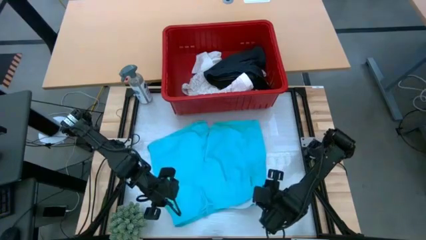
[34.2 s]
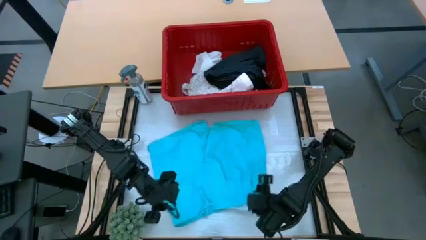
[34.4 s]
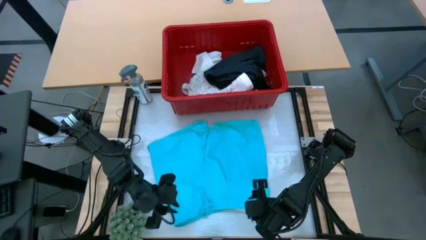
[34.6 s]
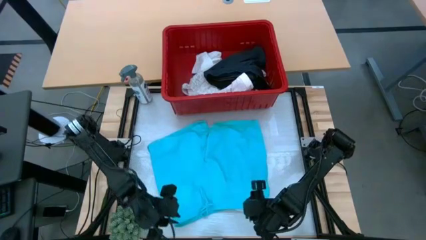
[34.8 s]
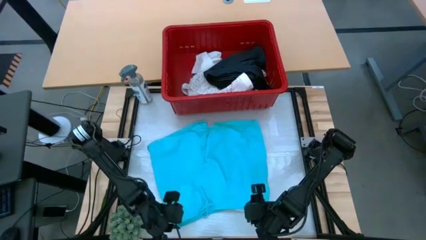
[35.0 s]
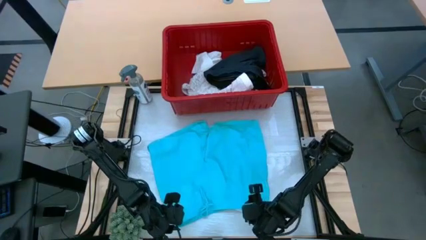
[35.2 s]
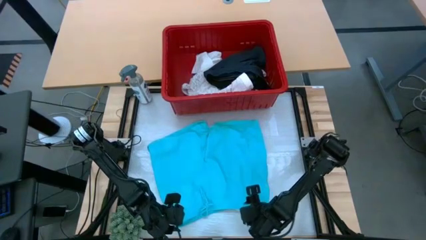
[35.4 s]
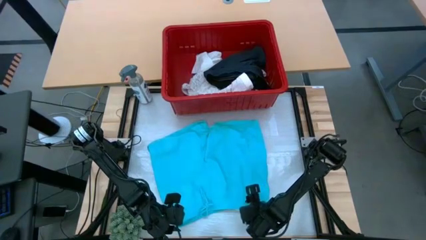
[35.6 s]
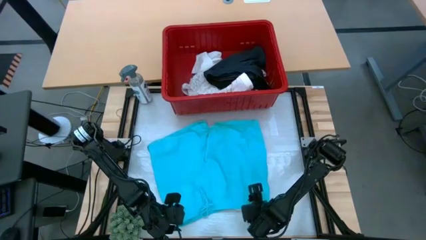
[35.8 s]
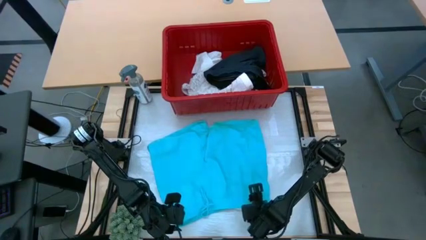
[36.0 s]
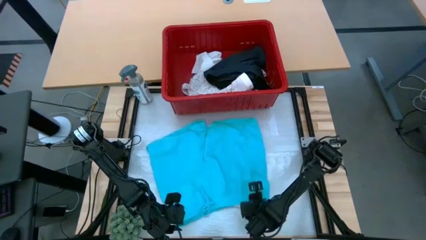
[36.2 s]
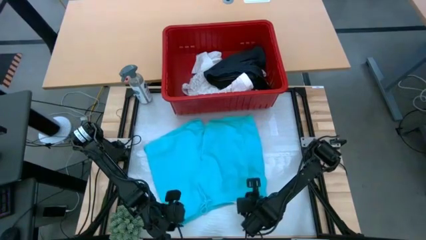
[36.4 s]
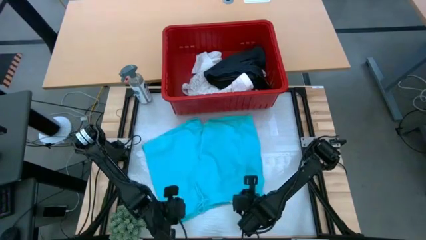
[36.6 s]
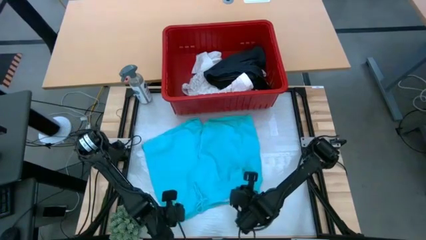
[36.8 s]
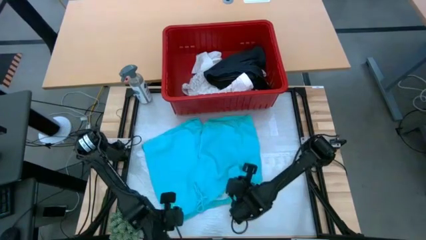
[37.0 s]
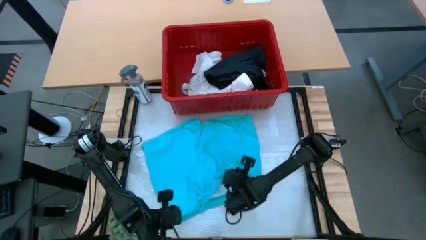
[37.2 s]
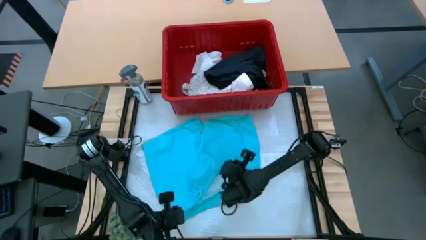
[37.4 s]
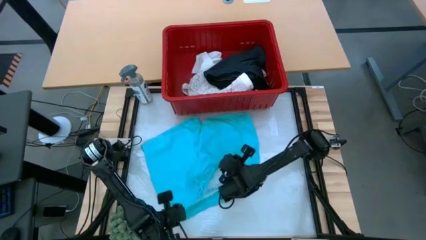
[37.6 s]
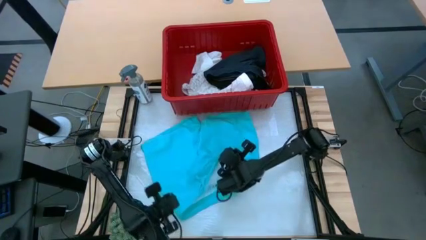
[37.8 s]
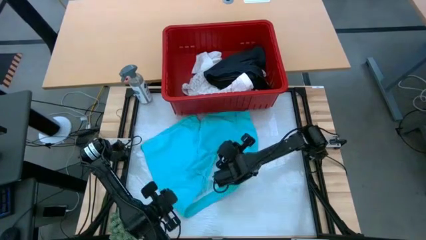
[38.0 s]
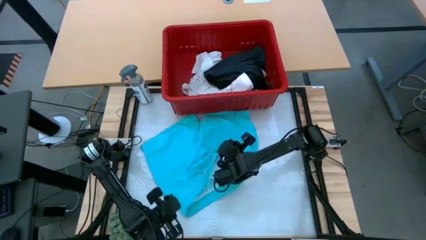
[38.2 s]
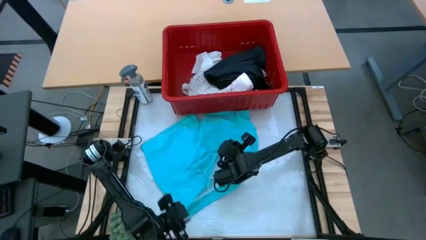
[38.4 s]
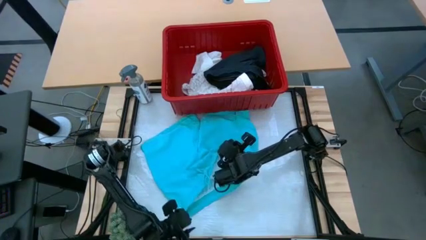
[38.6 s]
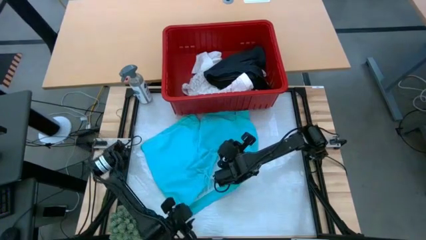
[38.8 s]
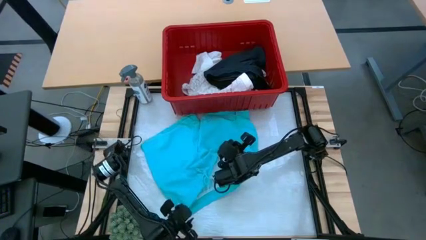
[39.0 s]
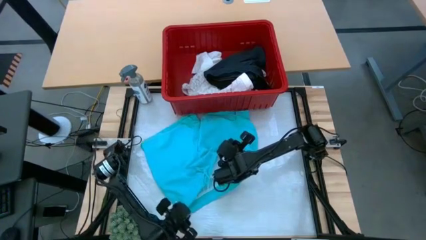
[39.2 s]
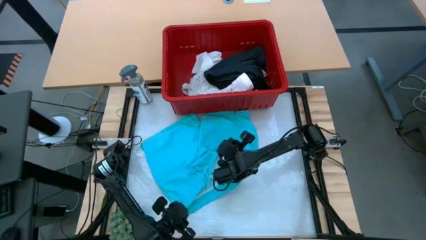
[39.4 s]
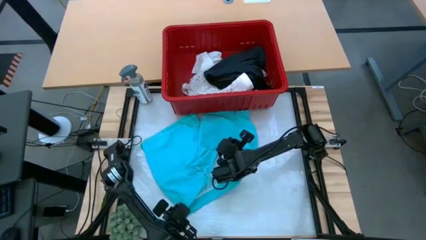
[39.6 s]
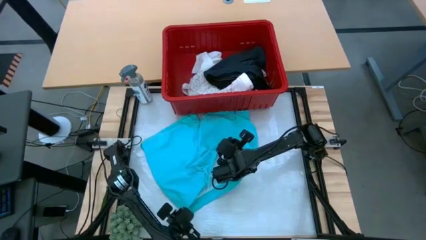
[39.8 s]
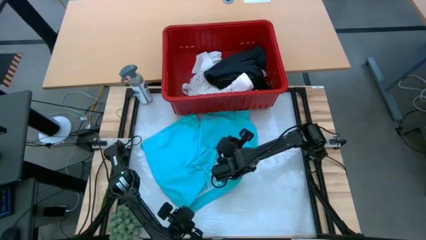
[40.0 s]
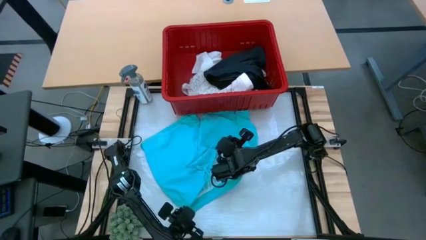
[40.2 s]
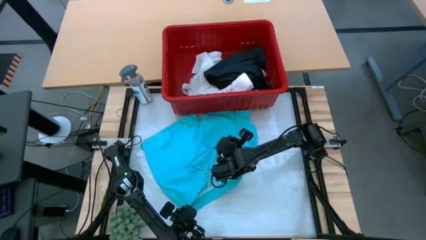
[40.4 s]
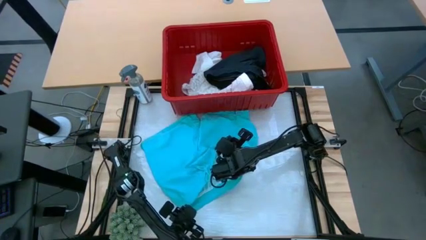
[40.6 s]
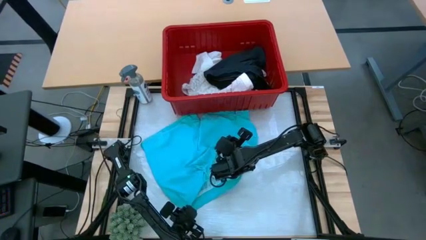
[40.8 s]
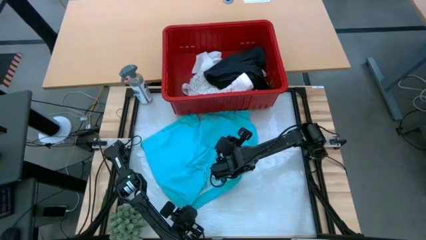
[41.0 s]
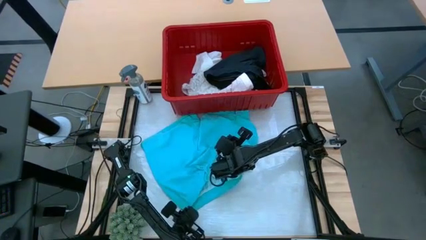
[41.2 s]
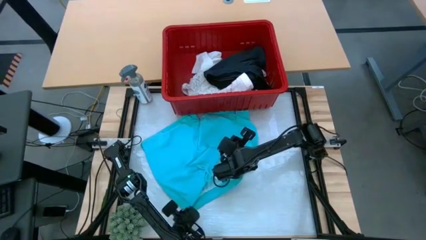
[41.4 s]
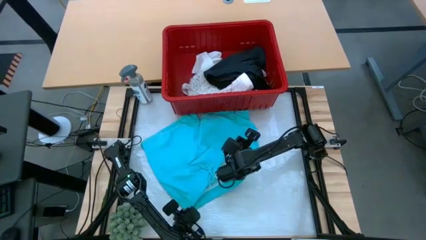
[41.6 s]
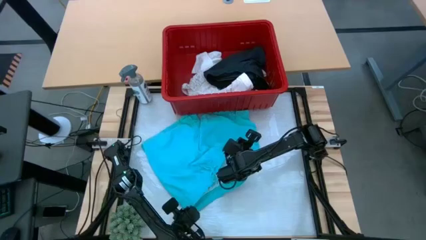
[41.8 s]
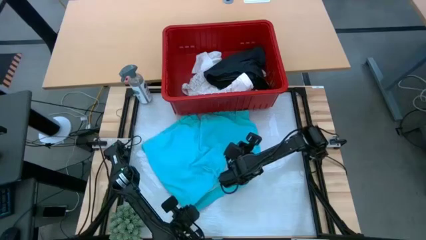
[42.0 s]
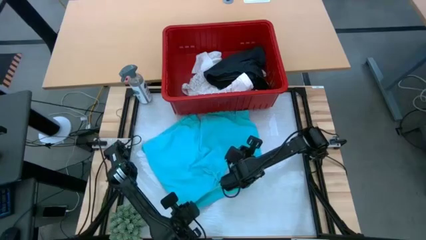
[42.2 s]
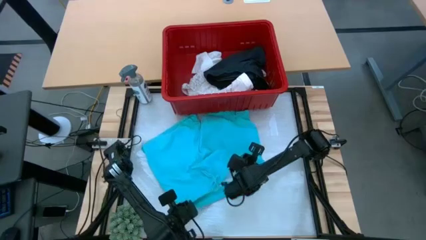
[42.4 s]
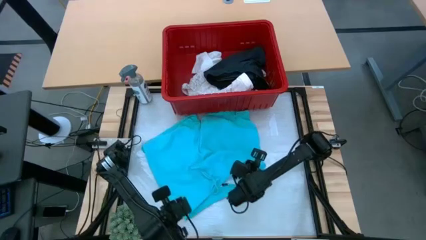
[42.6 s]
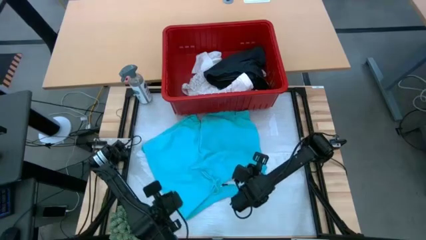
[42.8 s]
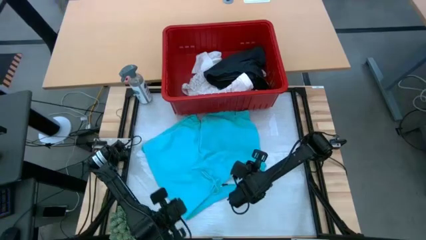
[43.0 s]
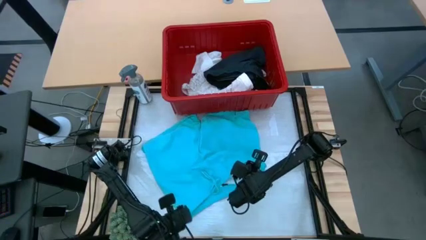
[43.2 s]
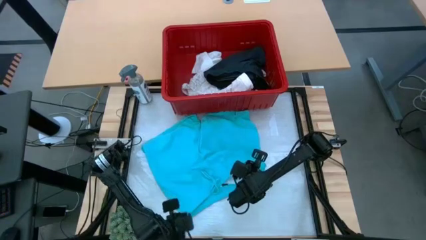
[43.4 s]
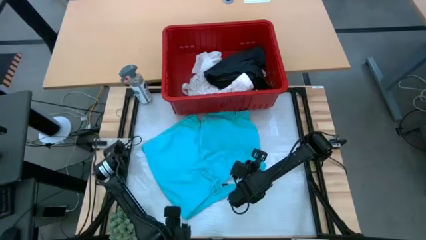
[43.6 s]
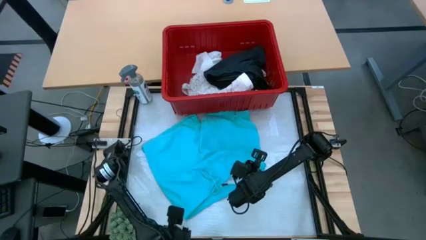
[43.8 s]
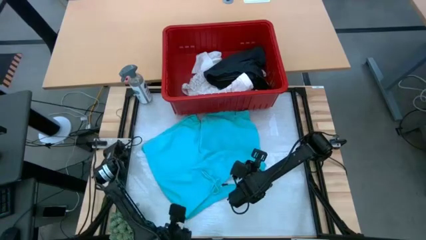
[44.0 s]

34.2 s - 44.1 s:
Task: Fold laundry
Fold the light blue shorts

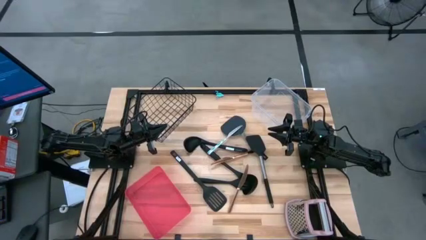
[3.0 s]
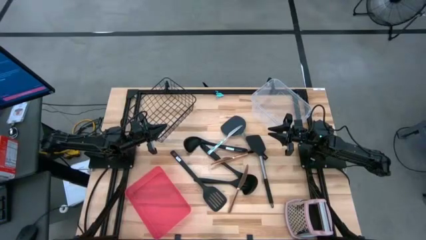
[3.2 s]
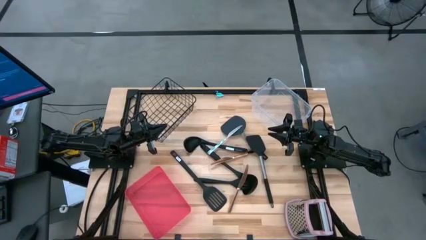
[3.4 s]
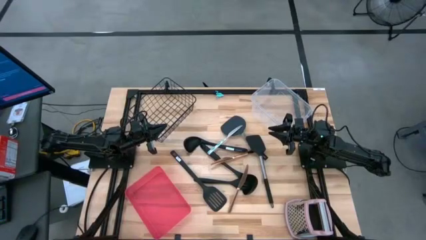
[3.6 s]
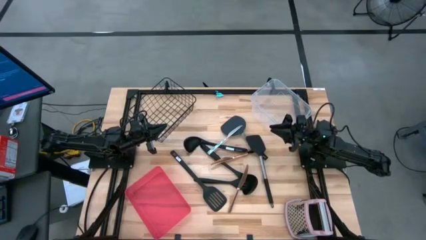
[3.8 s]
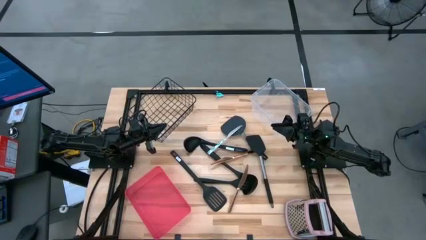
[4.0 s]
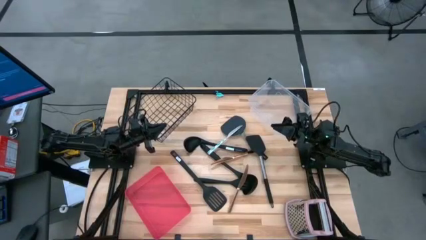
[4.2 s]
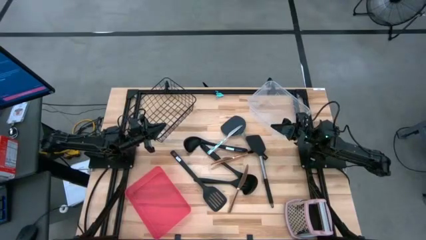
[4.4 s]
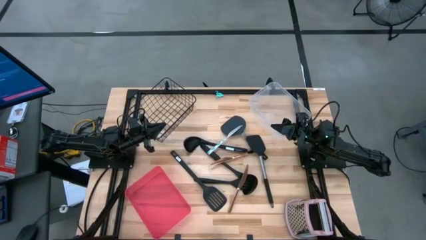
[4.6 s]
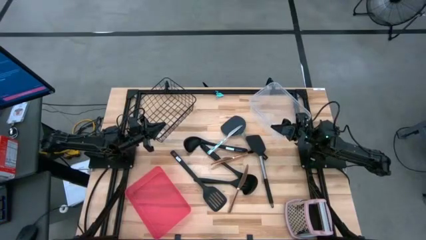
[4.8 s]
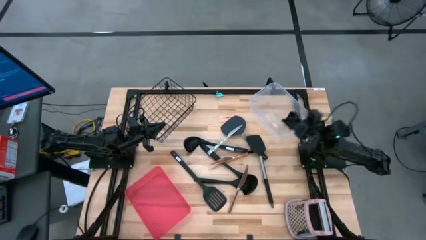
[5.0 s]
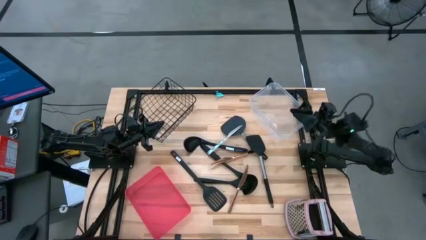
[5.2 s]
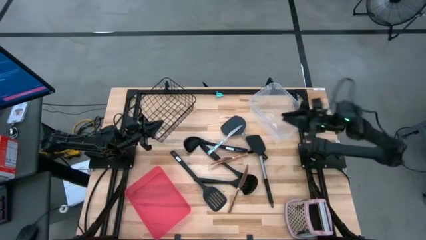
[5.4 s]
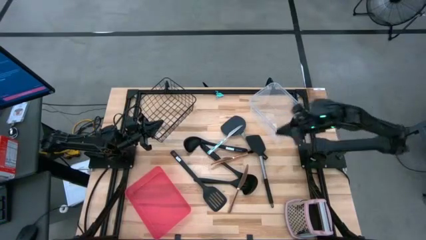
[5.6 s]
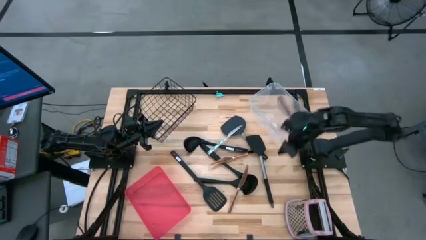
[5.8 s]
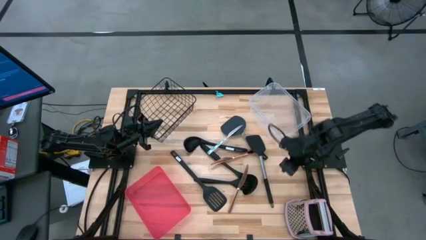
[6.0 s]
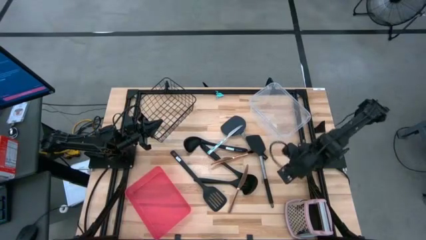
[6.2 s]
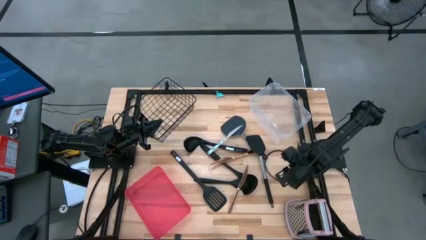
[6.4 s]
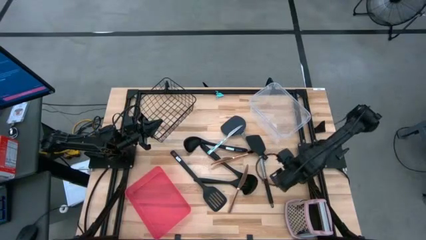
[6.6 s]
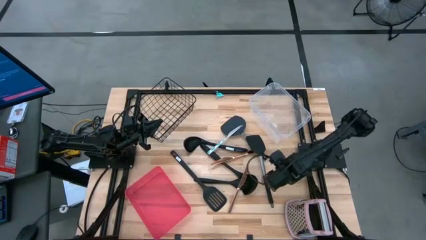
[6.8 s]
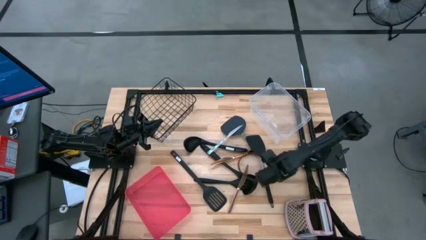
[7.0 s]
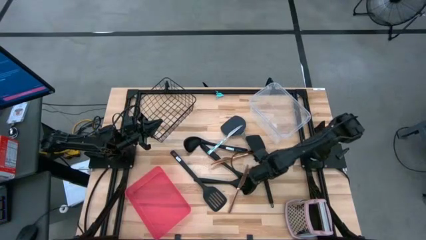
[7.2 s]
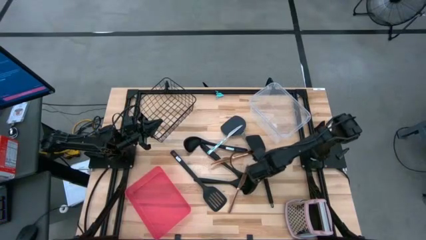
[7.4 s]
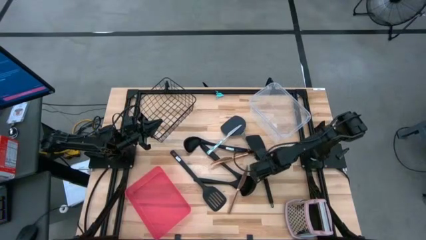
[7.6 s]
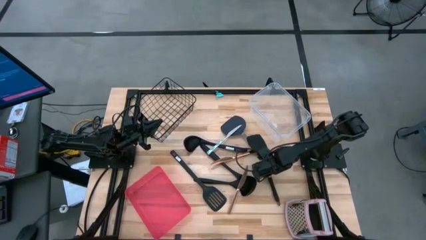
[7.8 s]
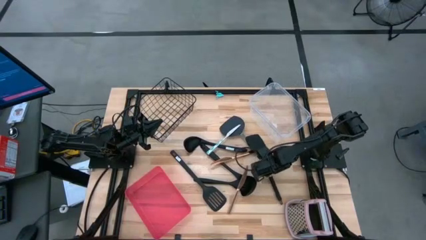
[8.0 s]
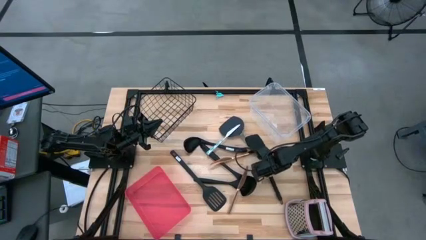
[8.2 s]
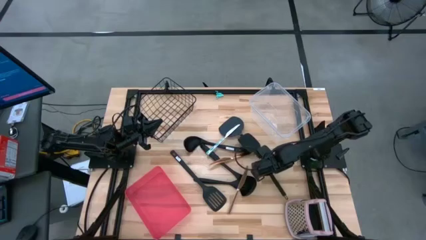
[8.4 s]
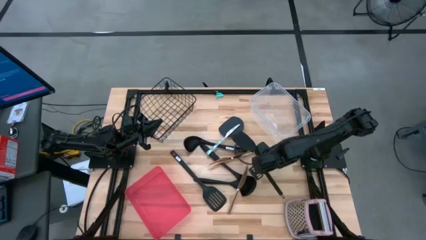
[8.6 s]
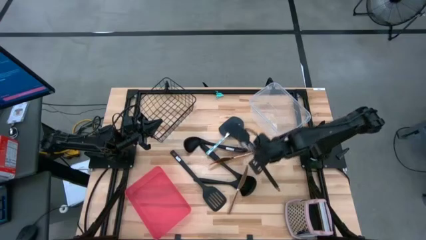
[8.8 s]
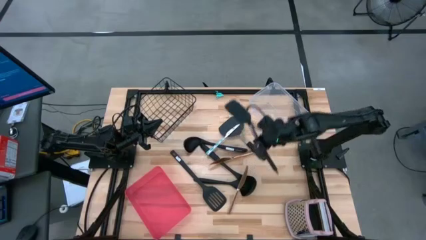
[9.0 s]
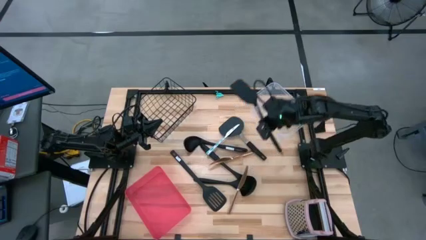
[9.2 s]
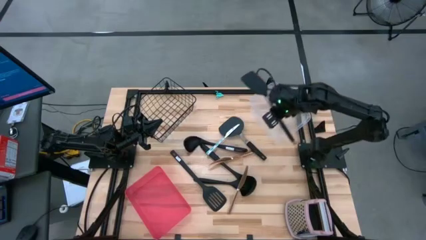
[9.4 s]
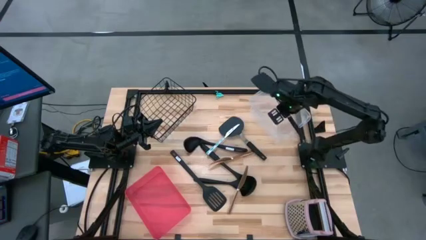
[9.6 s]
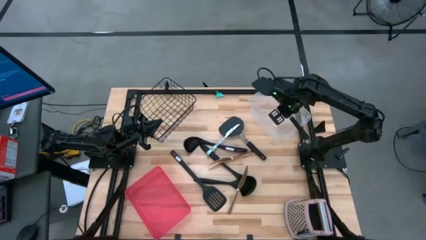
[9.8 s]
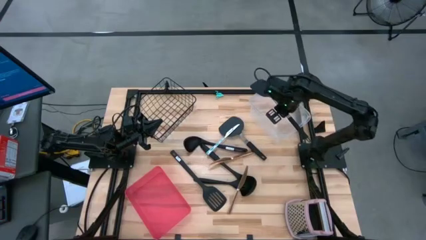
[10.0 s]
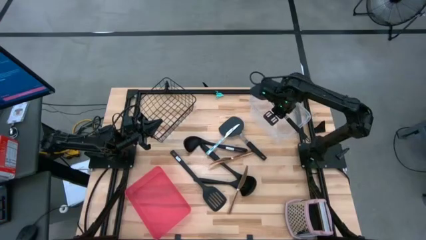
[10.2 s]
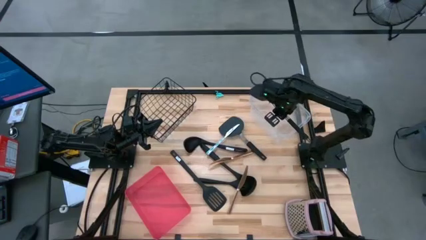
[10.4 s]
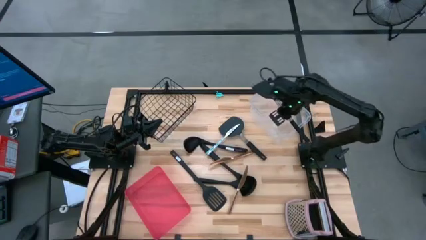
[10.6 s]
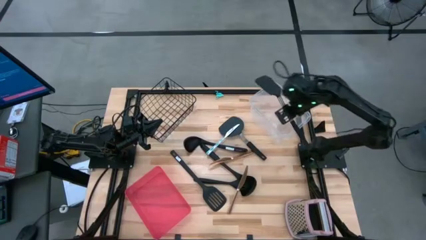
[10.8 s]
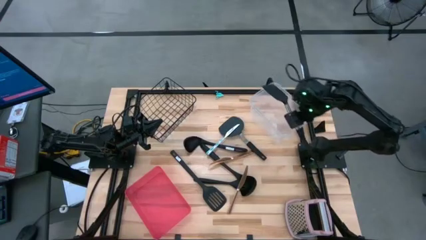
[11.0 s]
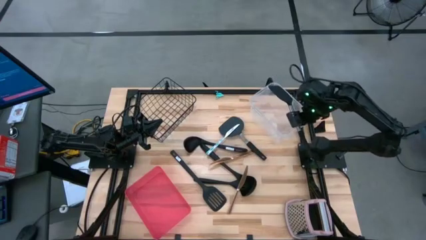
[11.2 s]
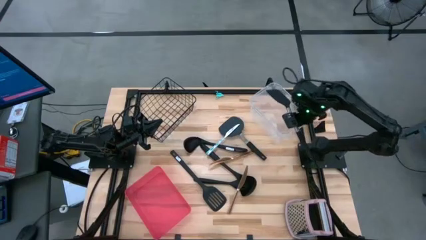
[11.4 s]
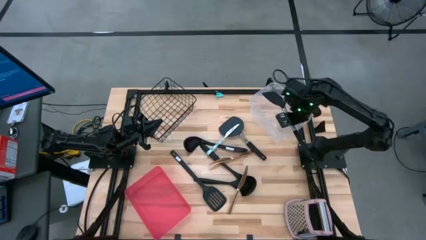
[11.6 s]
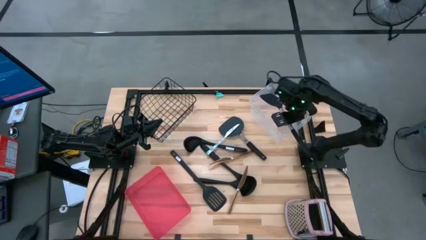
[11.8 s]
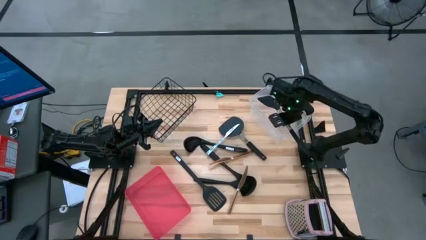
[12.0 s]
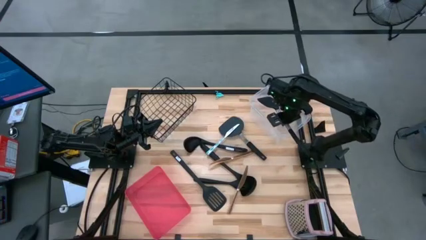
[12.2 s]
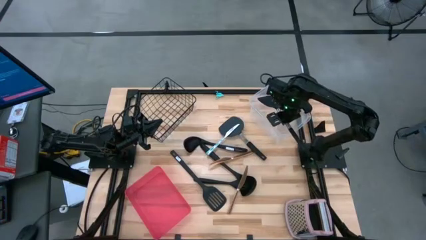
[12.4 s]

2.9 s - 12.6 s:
Task: Pick & Place Kitchen Items
Put the bottom black solid turner into the transparent bin
